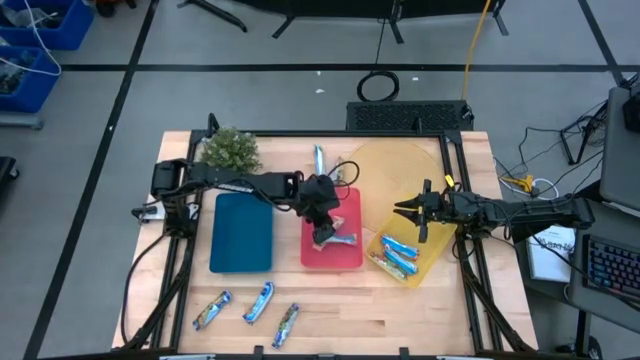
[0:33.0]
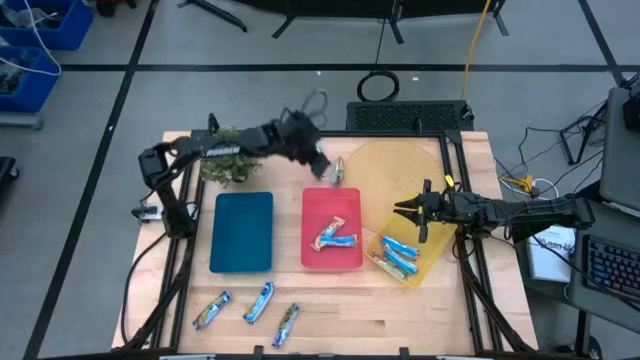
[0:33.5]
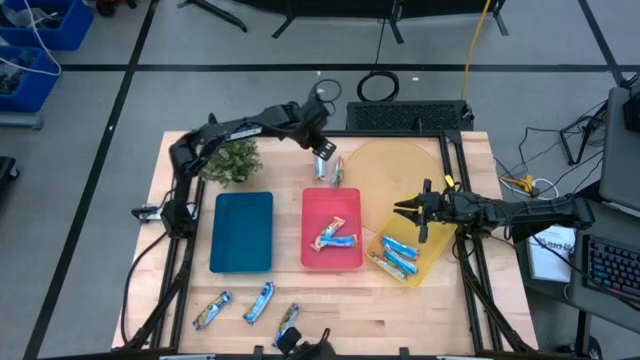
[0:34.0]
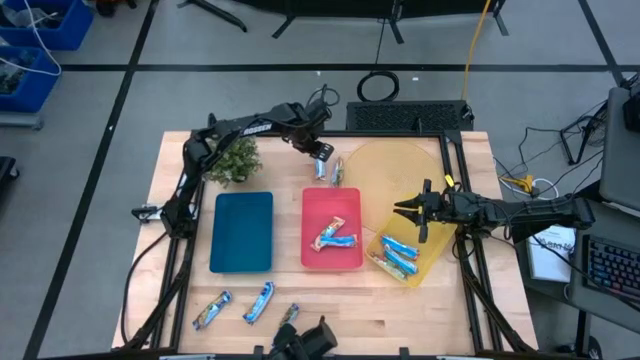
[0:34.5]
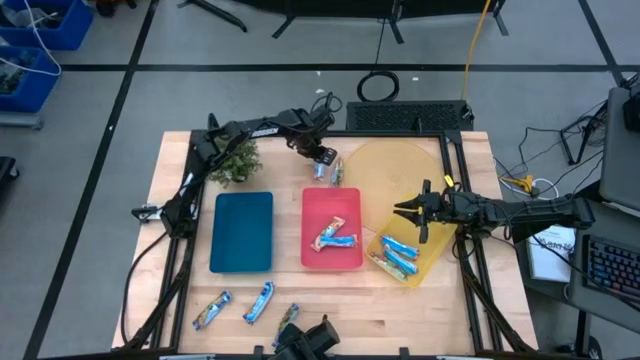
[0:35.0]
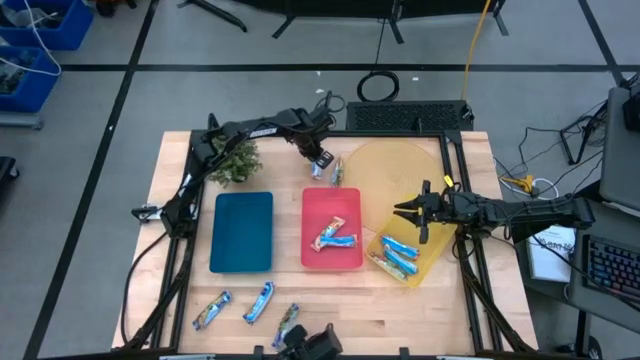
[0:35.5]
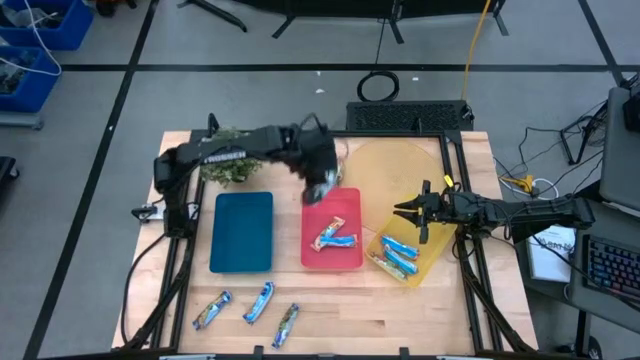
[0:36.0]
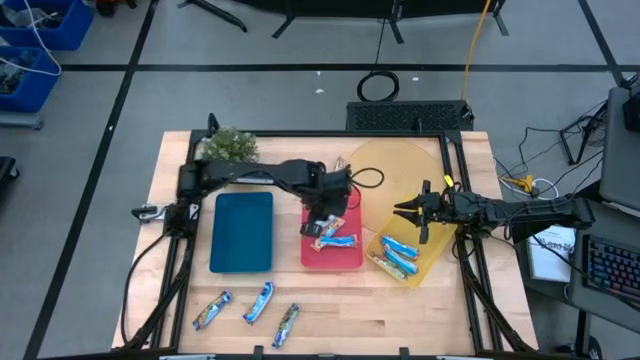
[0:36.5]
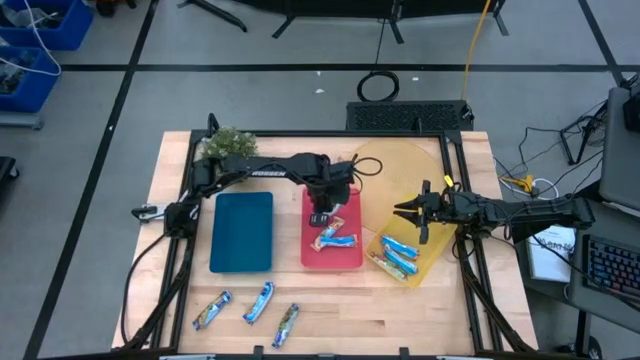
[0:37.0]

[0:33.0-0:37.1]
Task: Pick and place Granola Bars by type
Put the yellow granola bar into the red bin

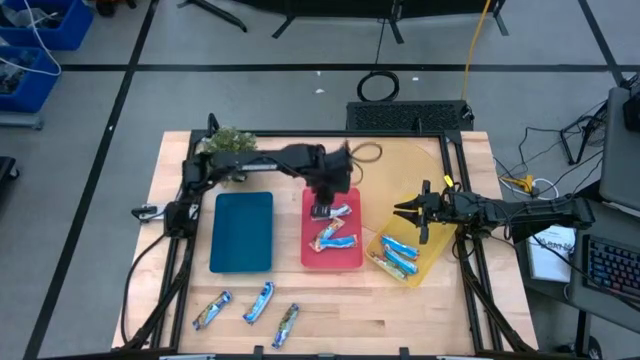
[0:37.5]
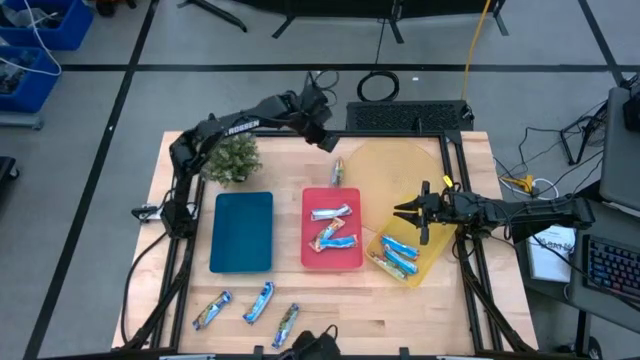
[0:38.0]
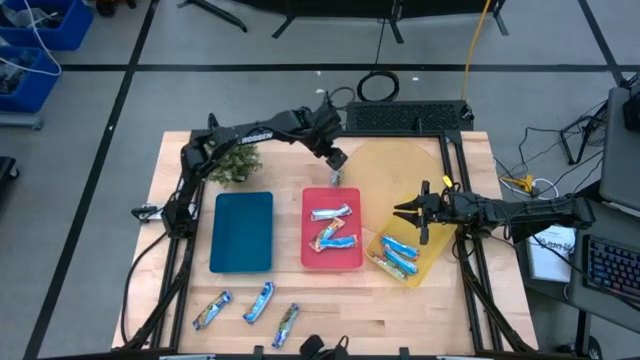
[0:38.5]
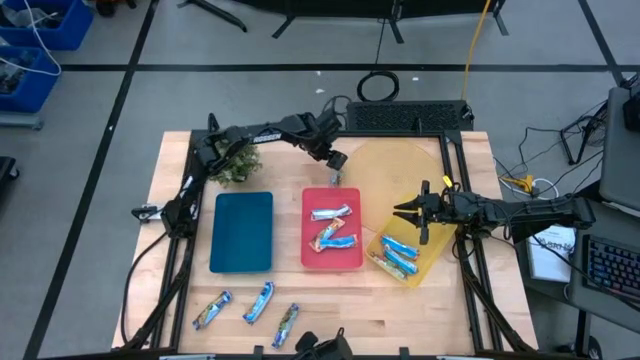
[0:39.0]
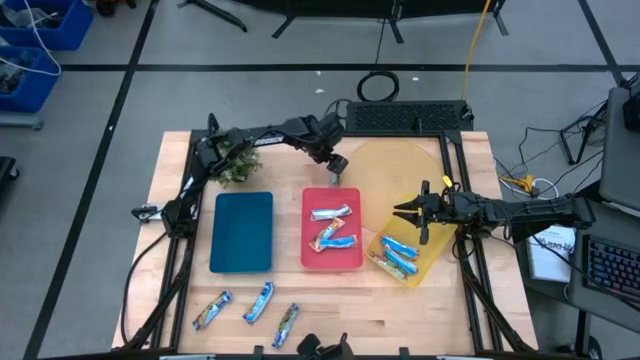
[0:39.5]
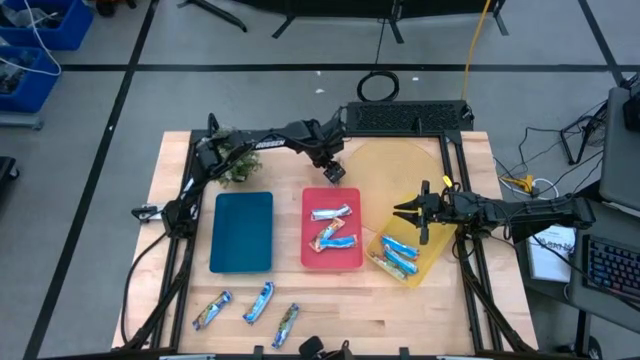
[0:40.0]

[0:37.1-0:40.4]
Put the yellow granola bar into the red bin

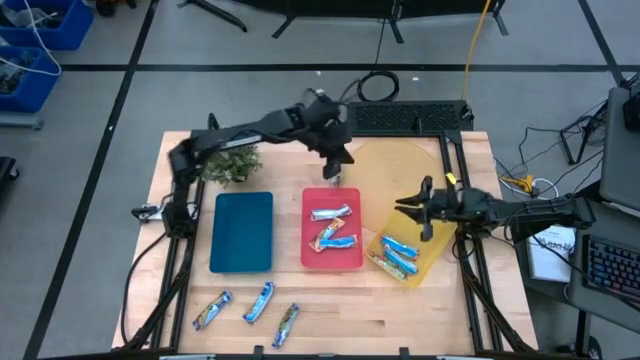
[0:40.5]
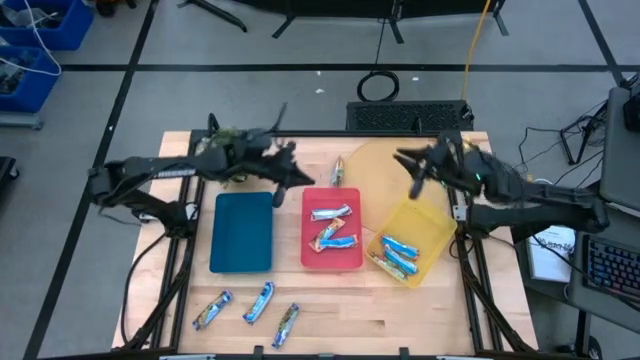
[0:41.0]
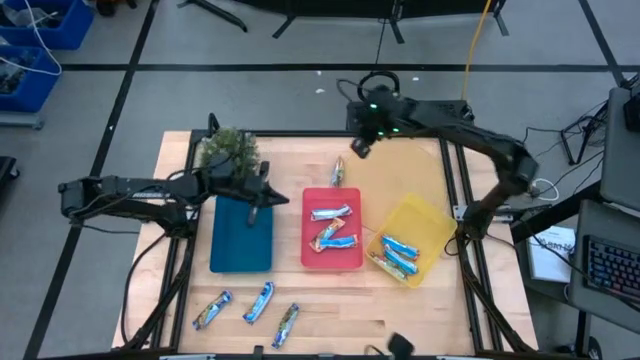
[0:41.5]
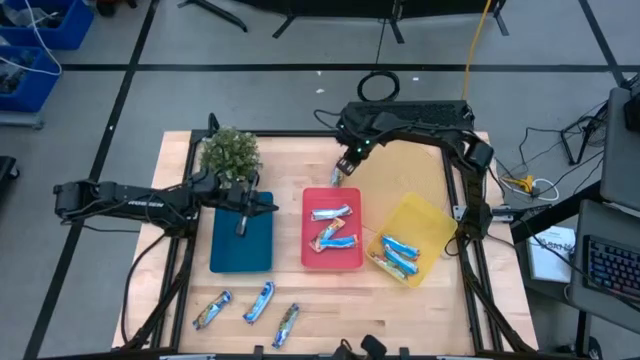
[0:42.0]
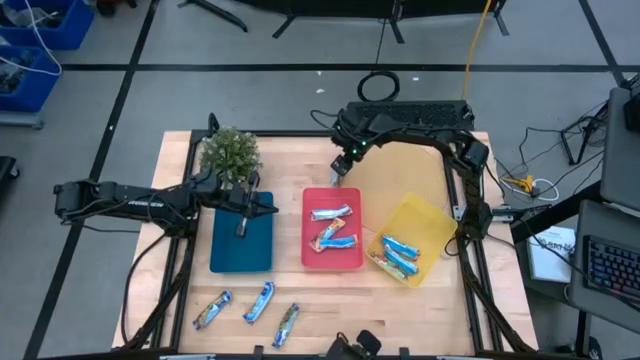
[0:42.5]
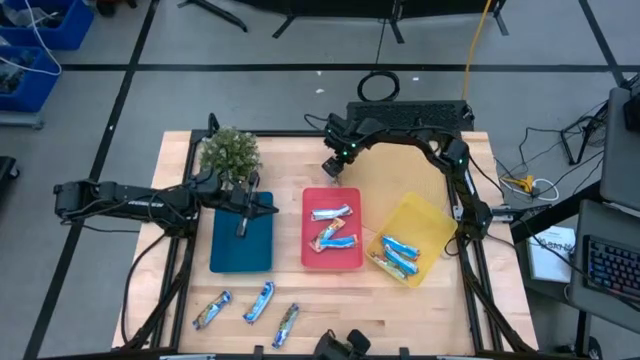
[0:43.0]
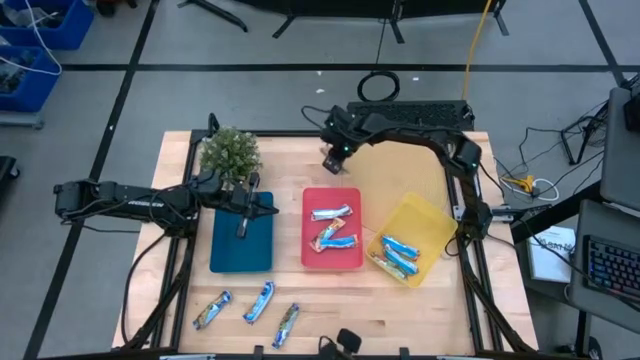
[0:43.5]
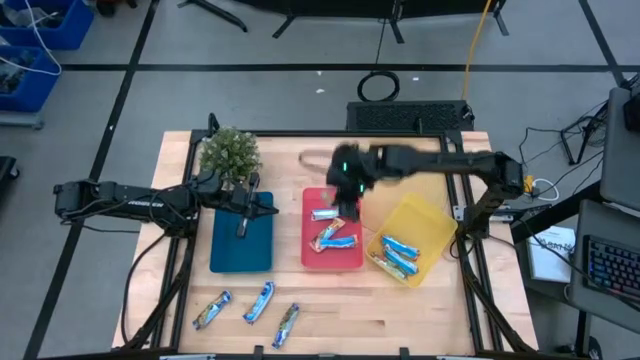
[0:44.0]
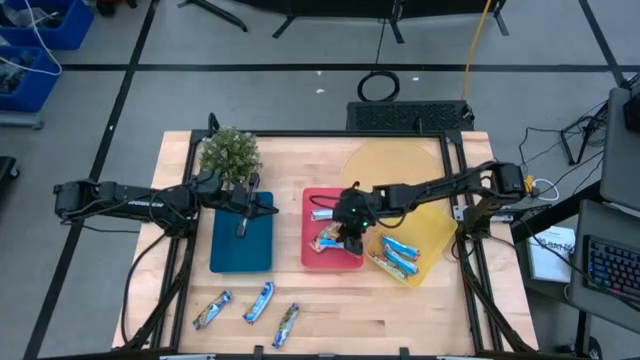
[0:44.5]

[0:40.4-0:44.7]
Put the yellow granola bar into the red bin

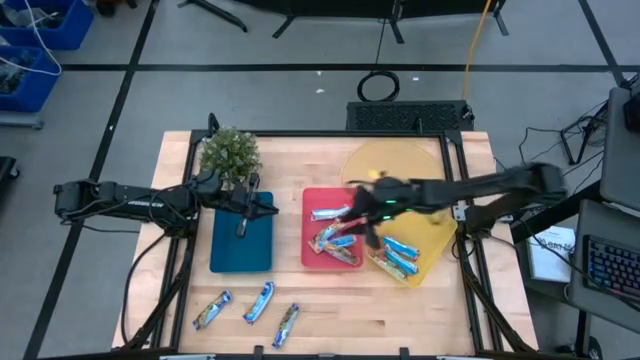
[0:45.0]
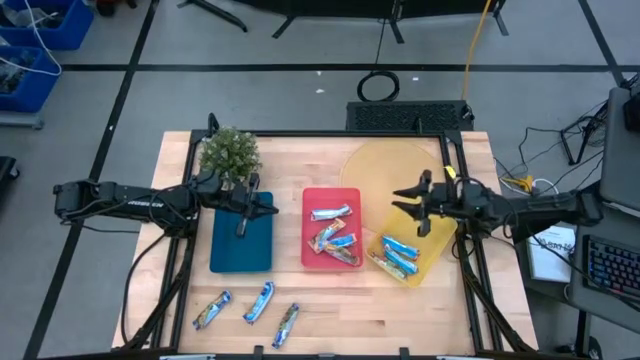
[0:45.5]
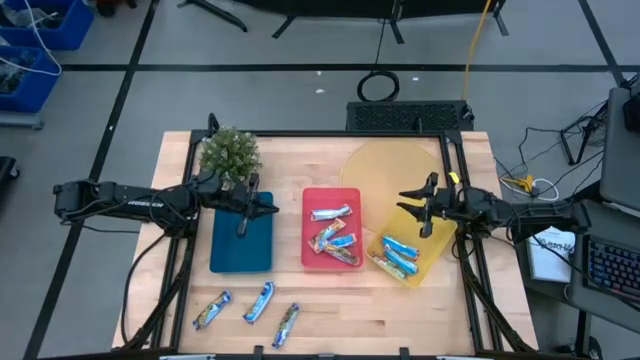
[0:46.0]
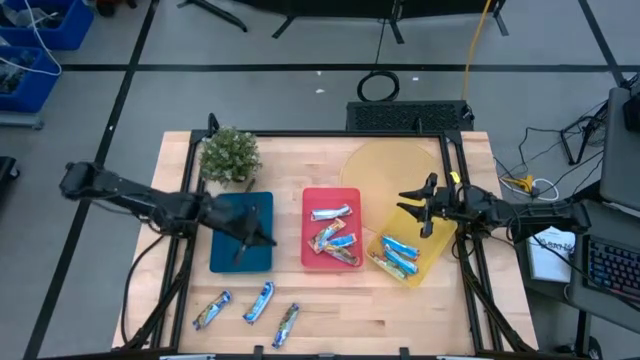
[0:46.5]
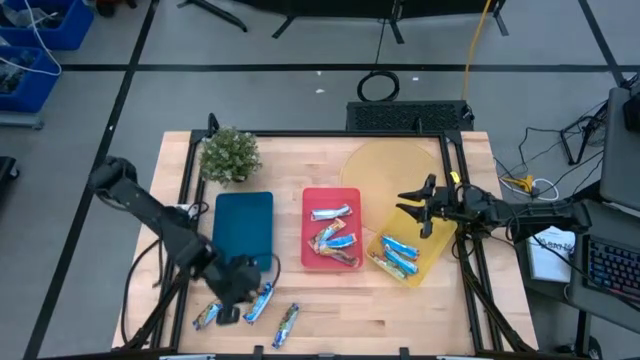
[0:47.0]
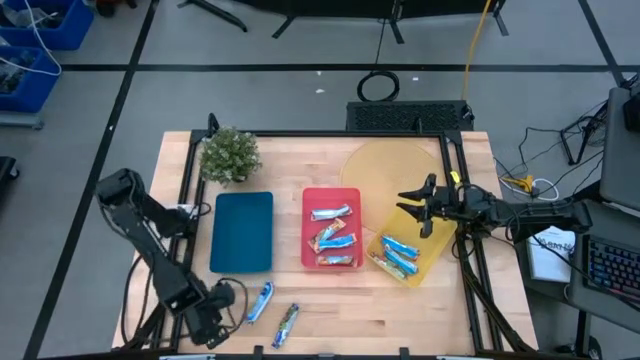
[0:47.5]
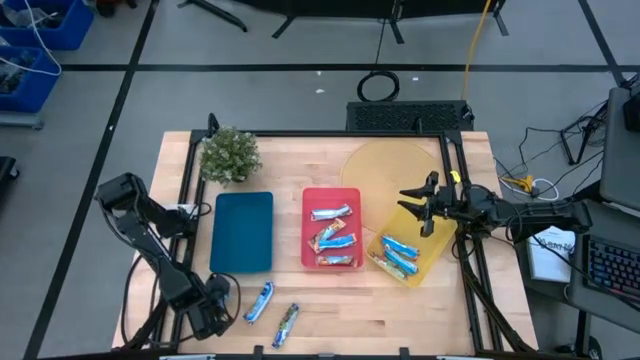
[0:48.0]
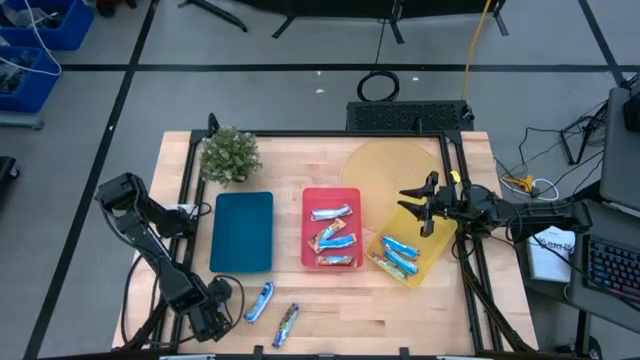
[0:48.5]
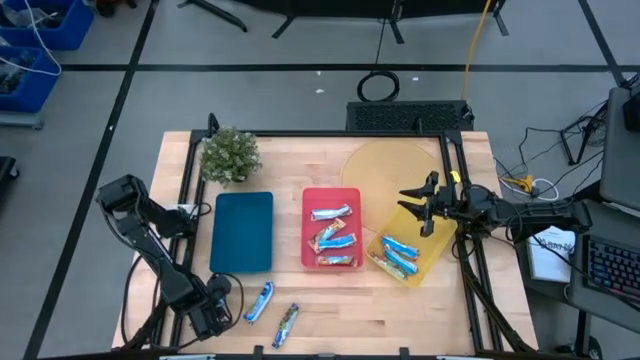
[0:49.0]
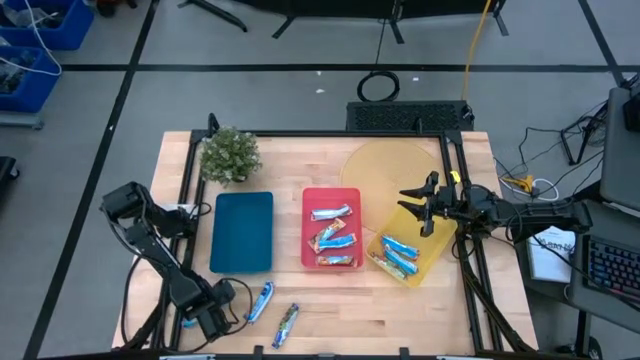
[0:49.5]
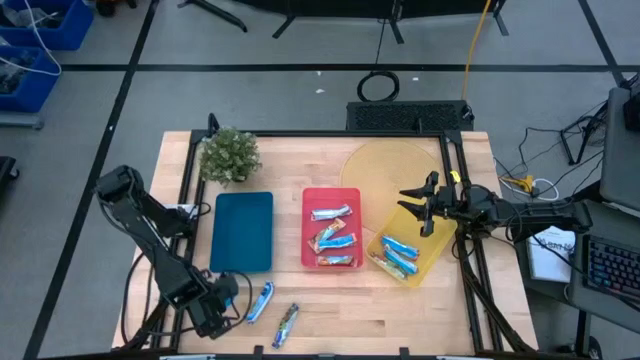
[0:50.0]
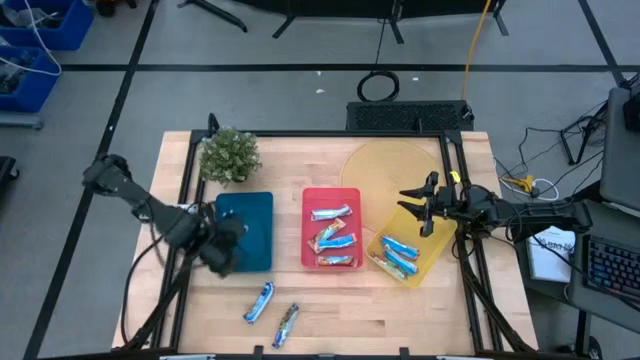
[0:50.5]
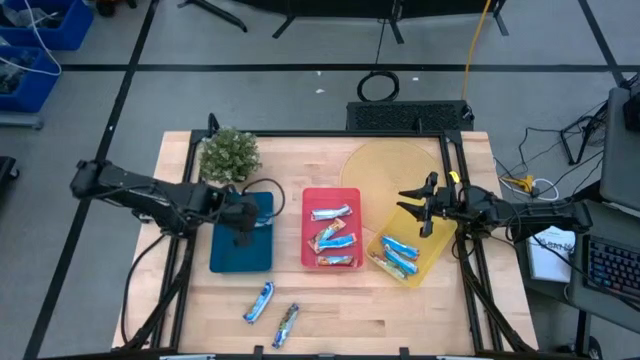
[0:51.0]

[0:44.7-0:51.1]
Put the blue granola bar into the blue bin

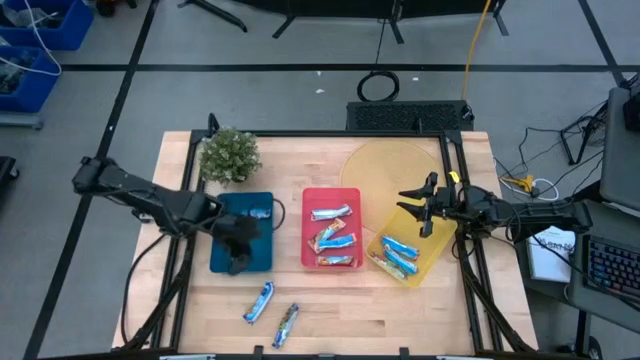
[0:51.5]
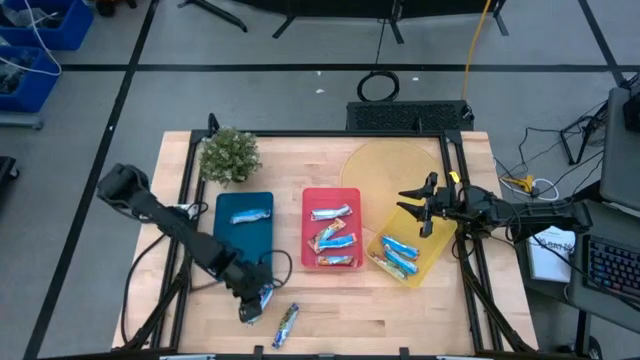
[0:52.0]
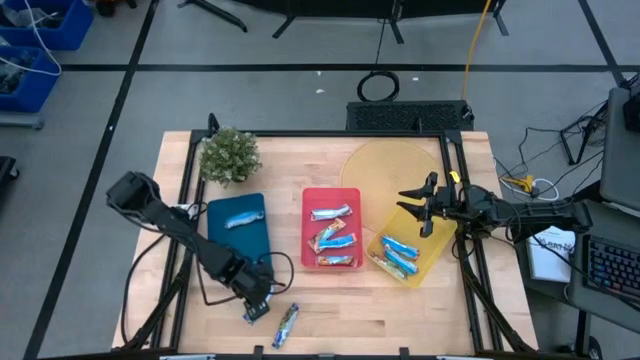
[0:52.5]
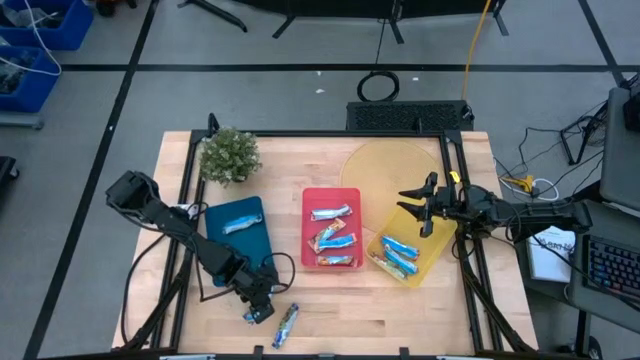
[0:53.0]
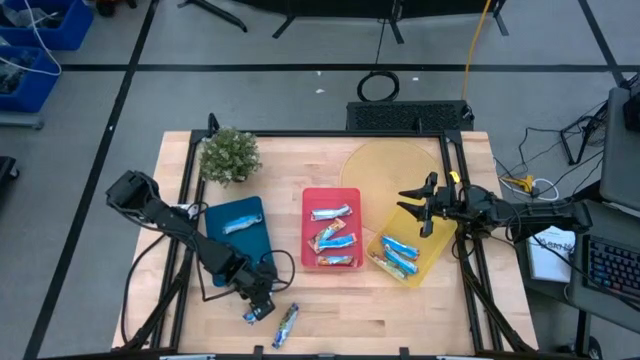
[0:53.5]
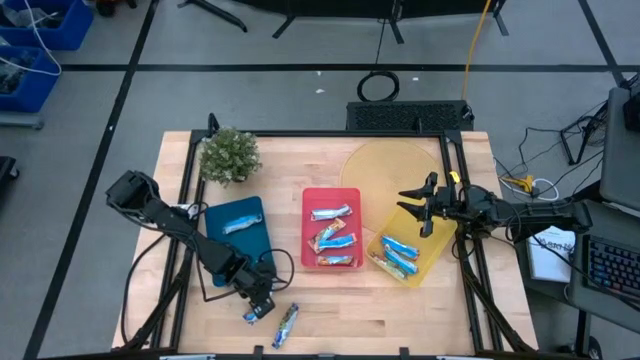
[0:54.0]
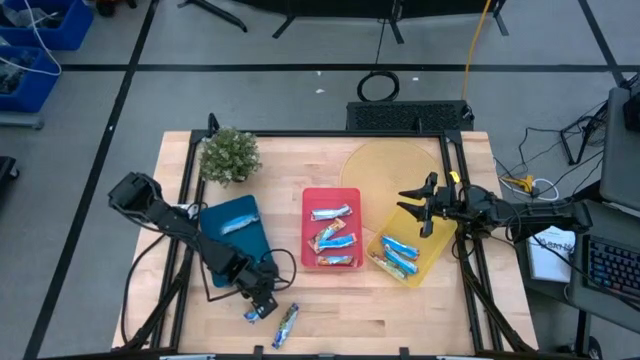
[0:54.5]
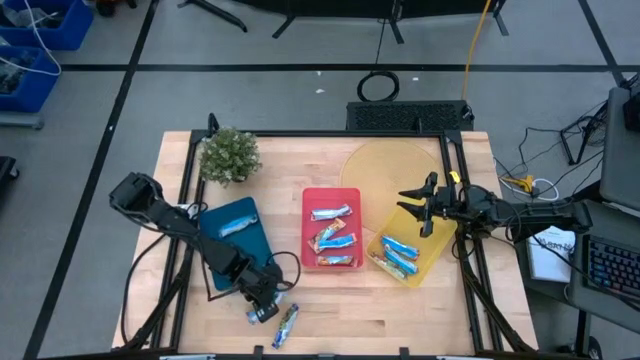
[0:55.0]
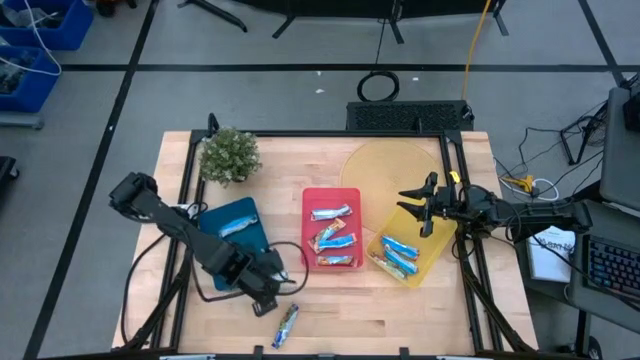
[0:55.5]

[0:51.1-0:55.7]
Put the blue granola bar into the blue bin
